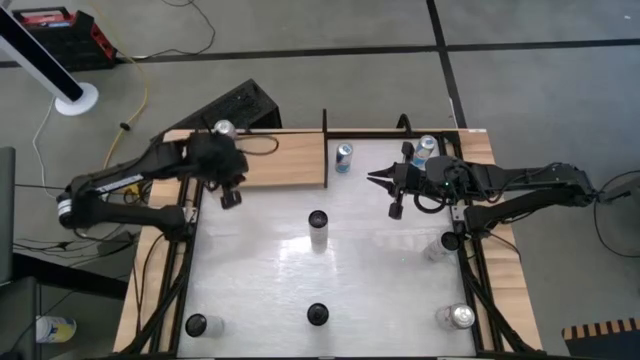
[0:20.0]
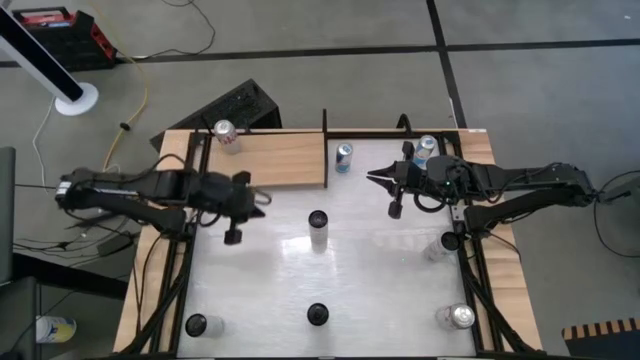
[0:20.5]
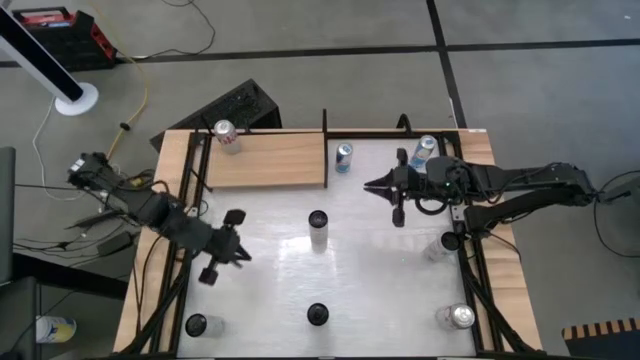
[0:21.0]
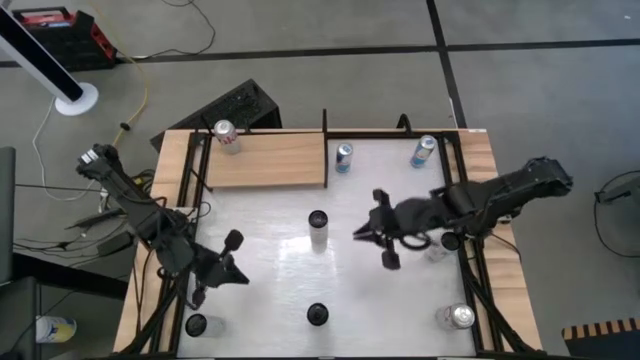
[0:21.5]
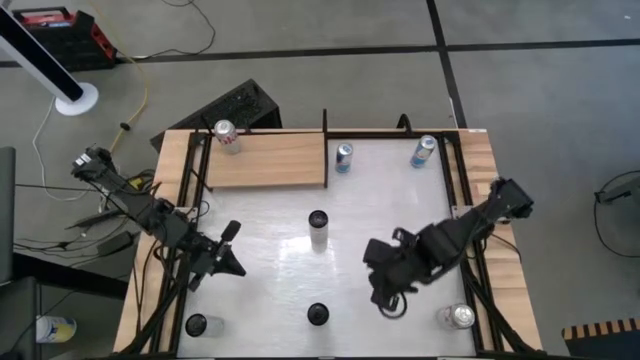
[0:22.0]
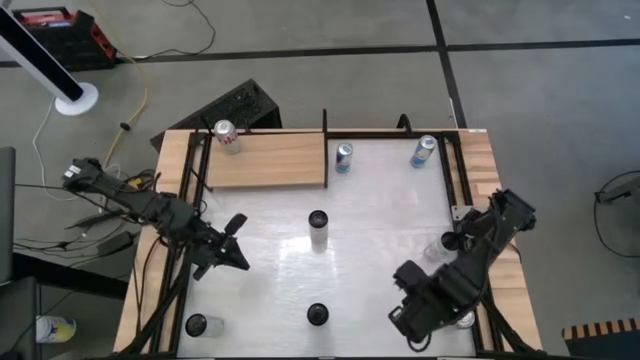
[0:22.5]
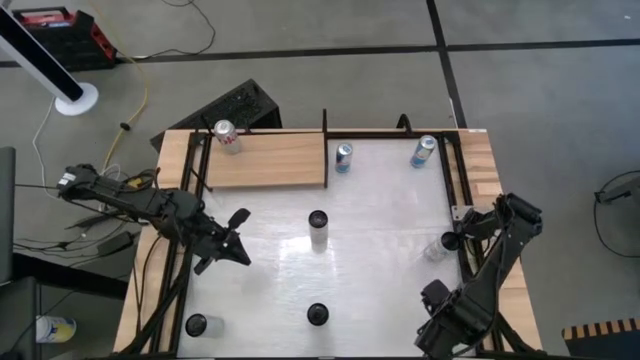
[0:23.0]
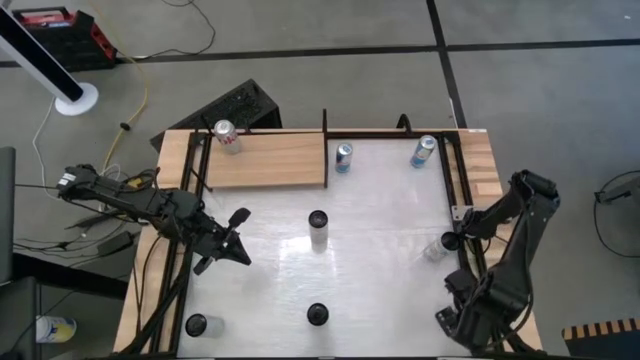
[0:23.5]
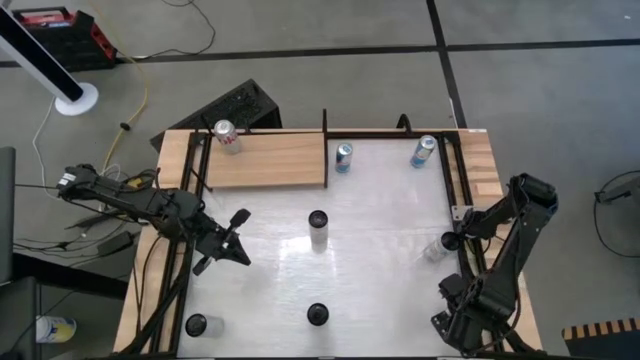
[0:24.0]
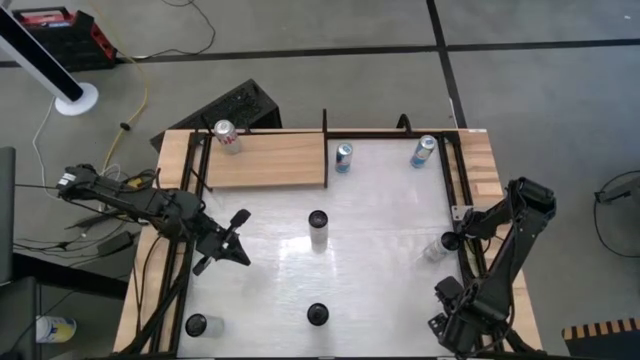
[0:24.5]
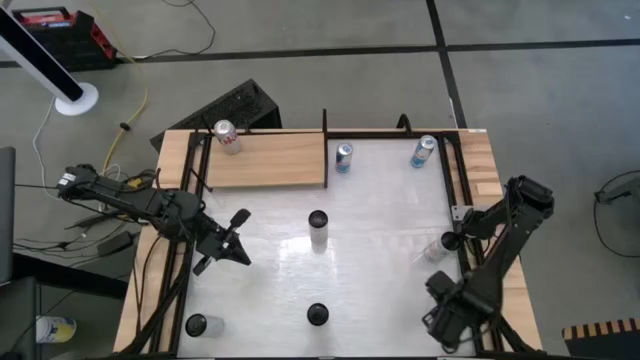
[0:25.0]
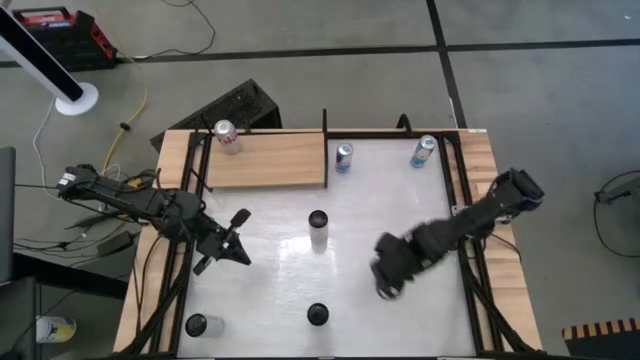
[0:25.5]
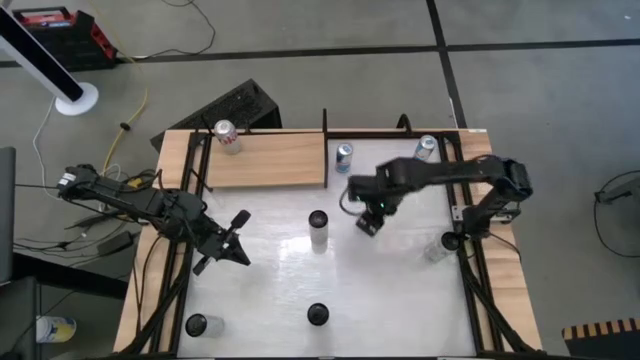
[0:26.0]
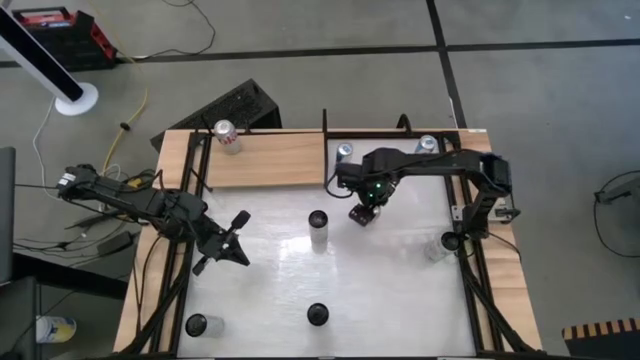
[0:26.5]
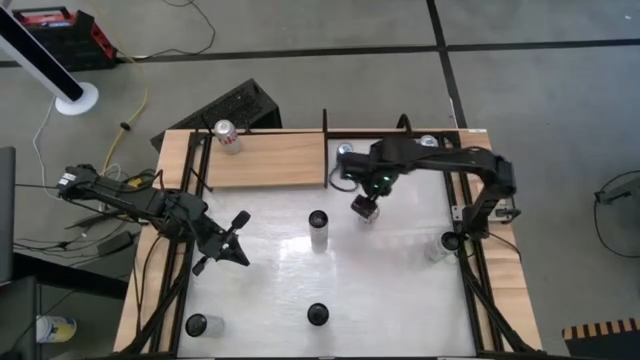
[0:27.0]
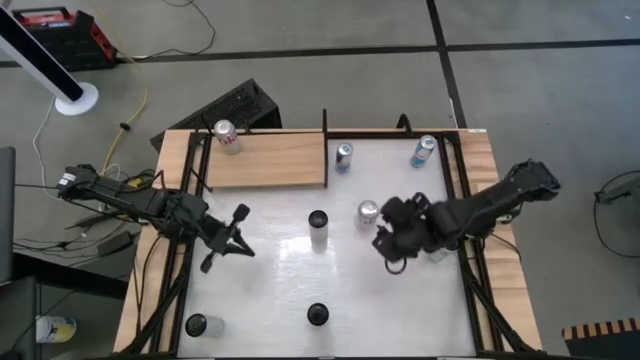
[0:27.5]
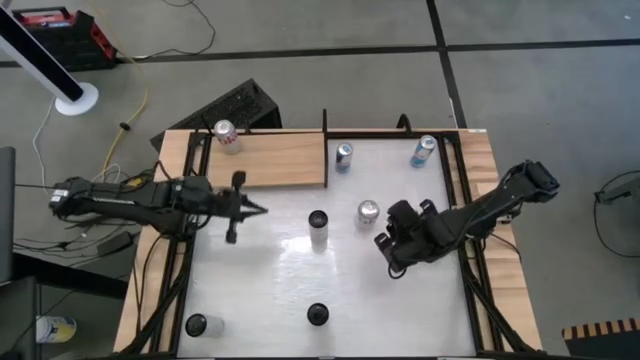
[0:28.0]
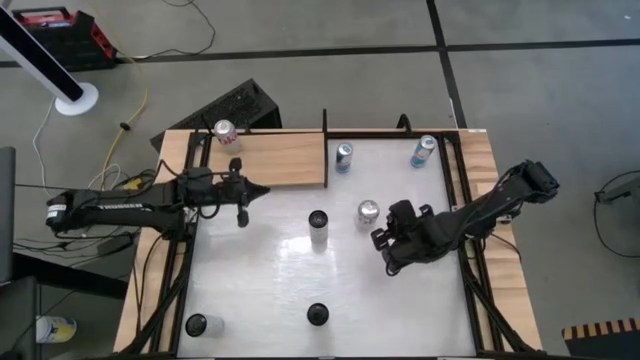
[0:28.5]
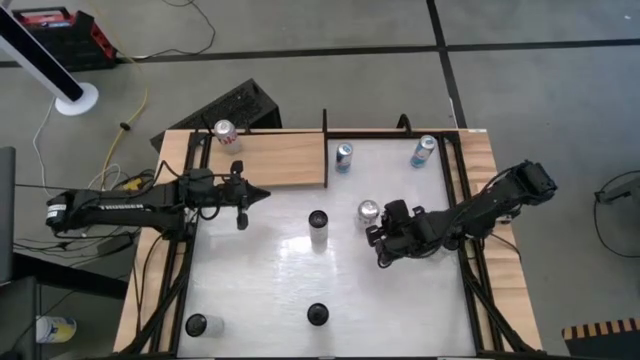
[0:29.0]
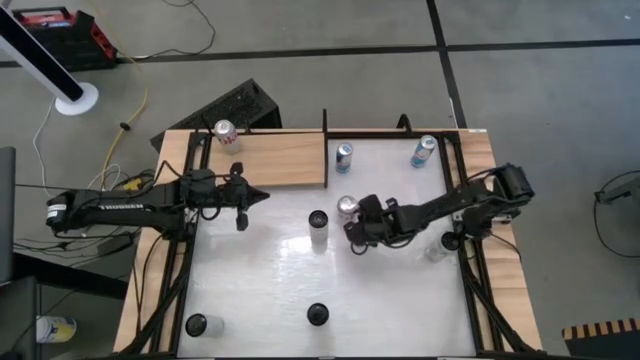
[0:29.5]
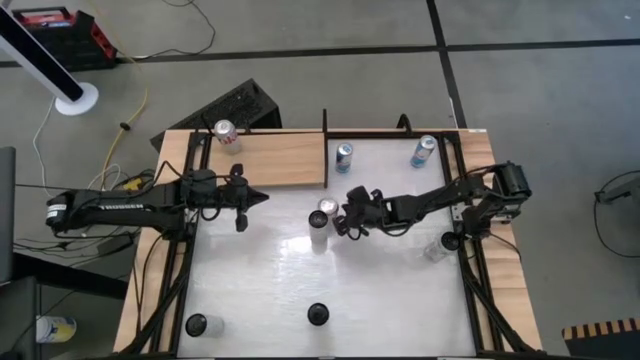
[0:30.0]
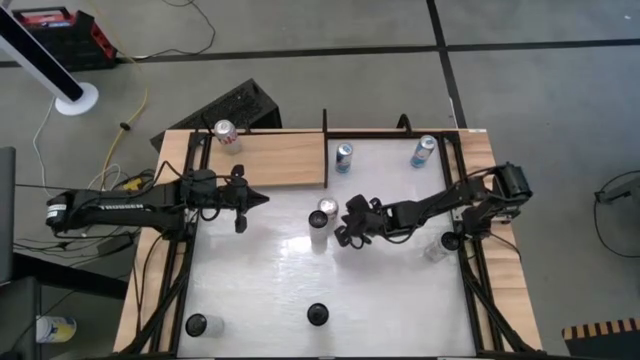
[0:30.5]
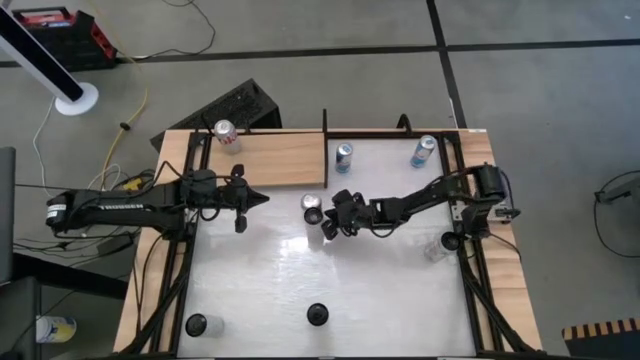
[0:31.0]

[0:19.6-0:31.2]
Task: Place canned beverage on shelf
Move the silver soda can to the middle of the table

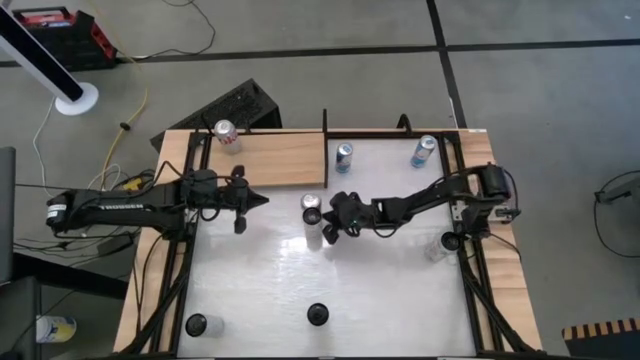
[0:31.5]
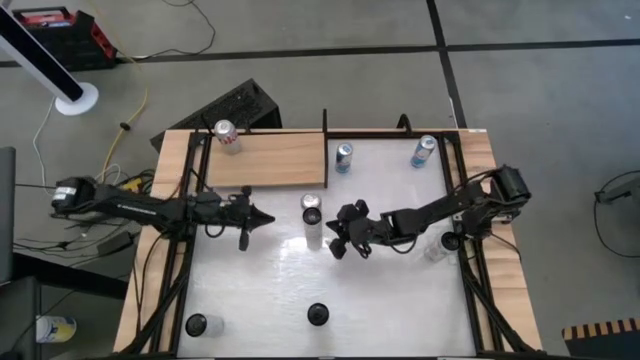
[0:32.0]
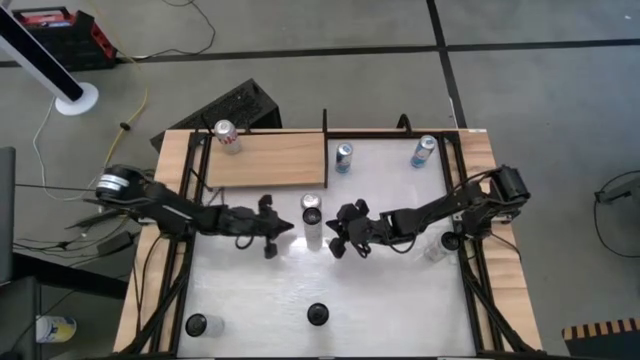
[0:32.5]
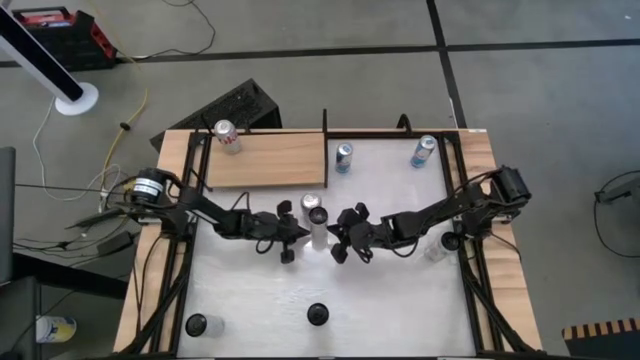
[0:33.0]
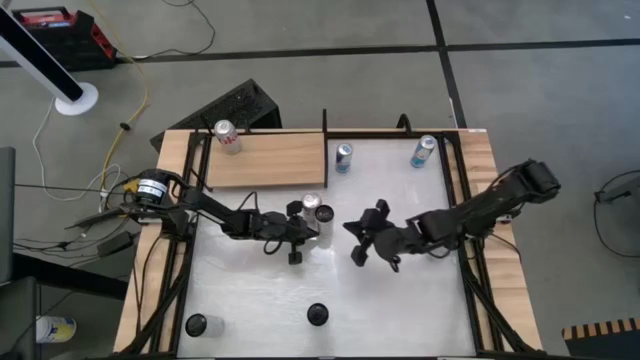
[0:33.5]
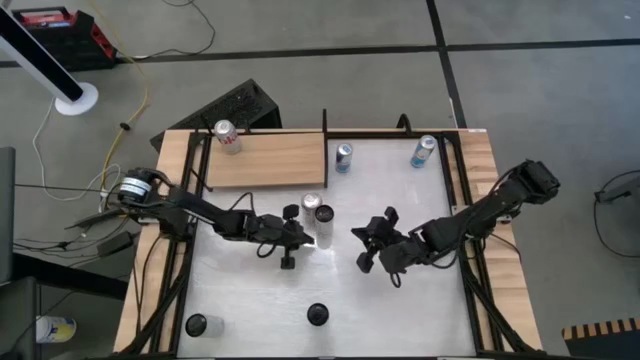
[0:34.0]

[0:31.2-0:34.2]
Move the middle white and yellow soda can to the right

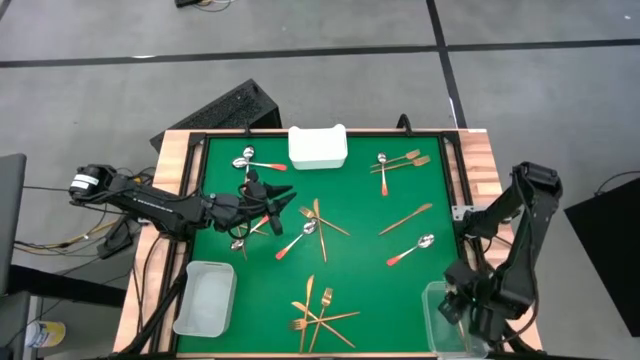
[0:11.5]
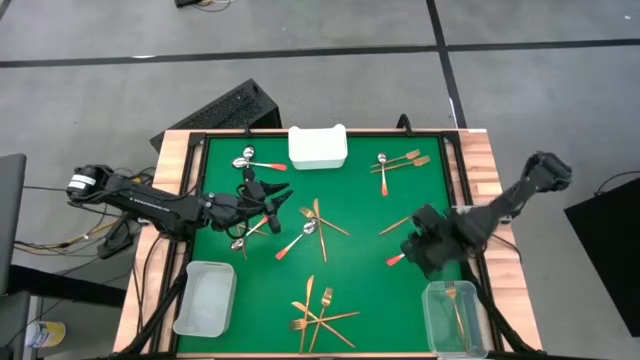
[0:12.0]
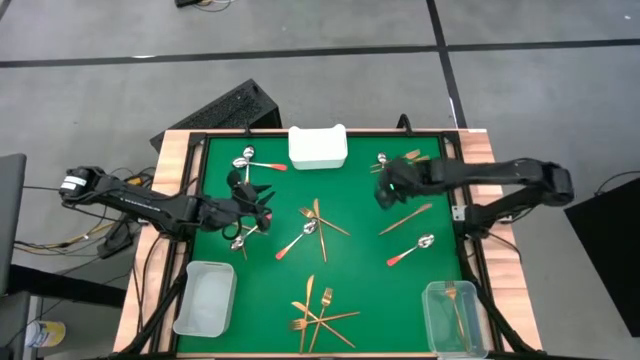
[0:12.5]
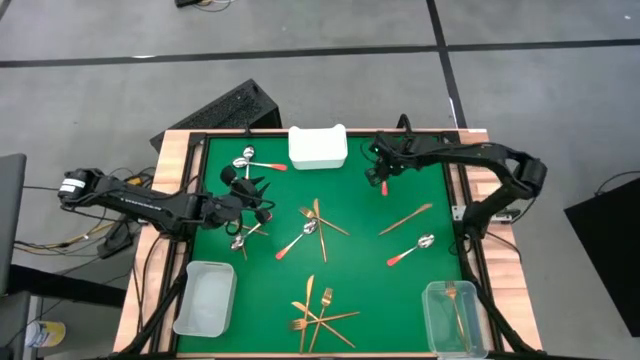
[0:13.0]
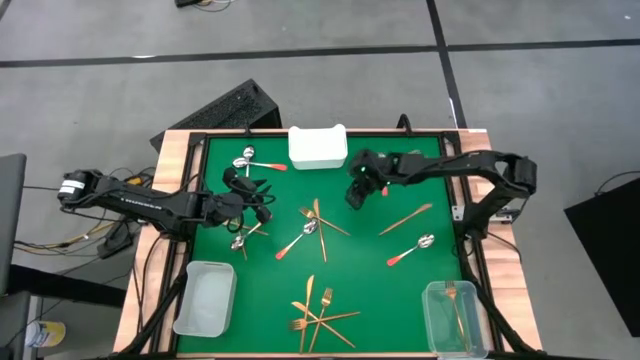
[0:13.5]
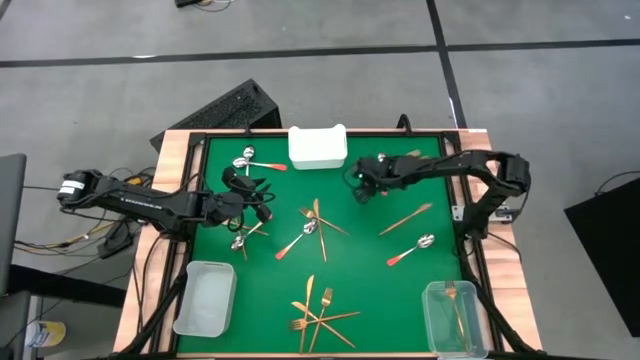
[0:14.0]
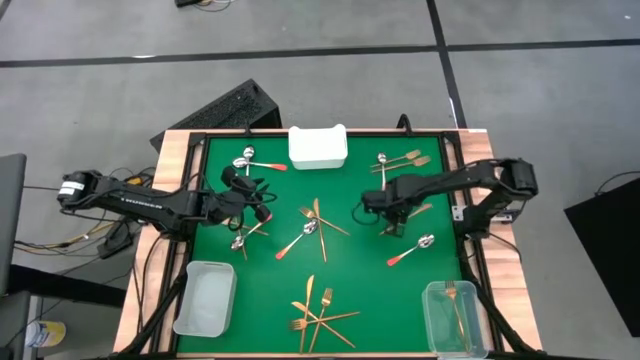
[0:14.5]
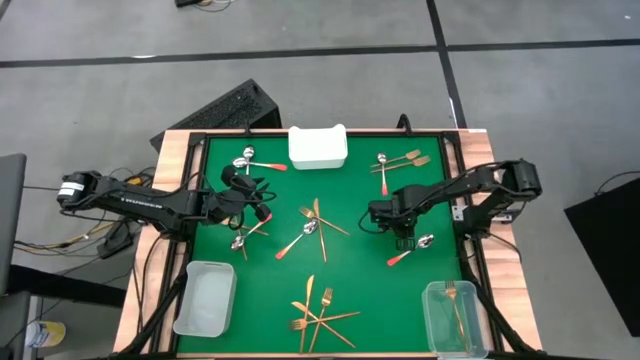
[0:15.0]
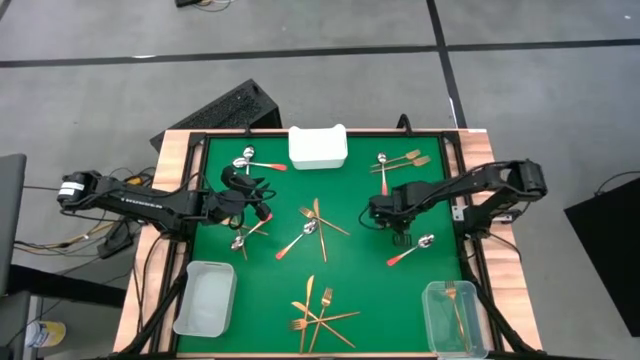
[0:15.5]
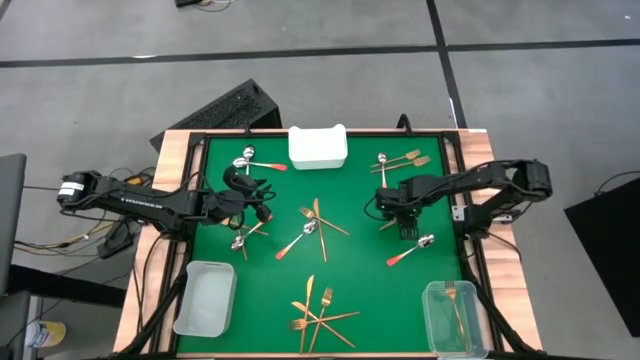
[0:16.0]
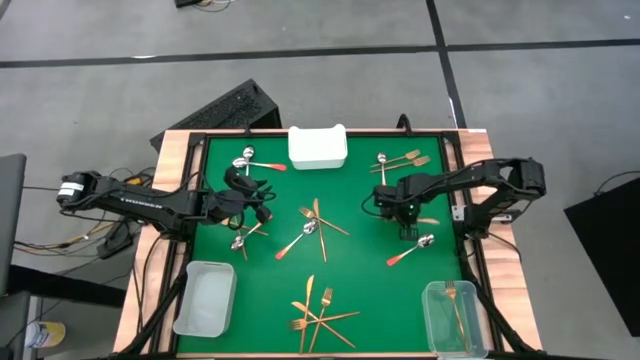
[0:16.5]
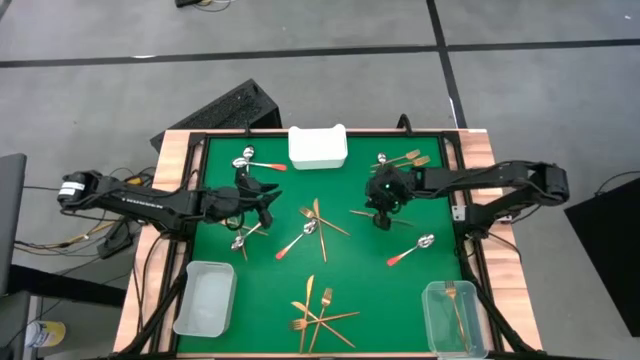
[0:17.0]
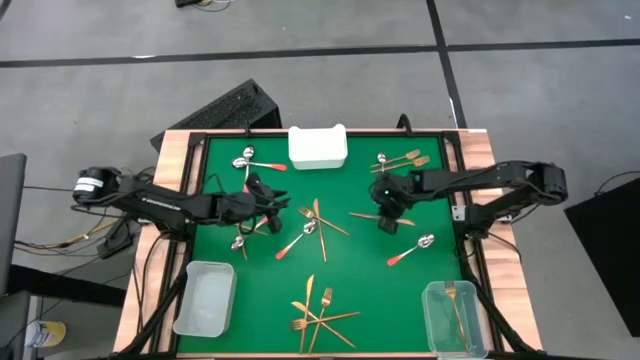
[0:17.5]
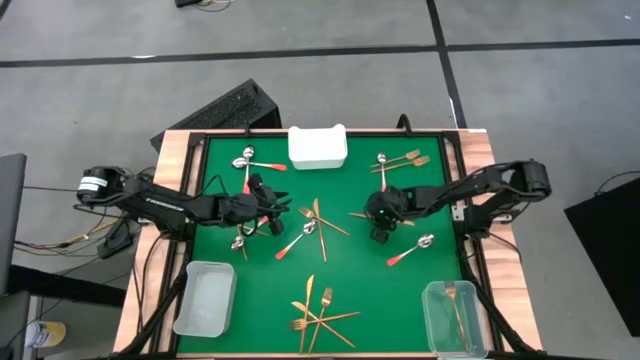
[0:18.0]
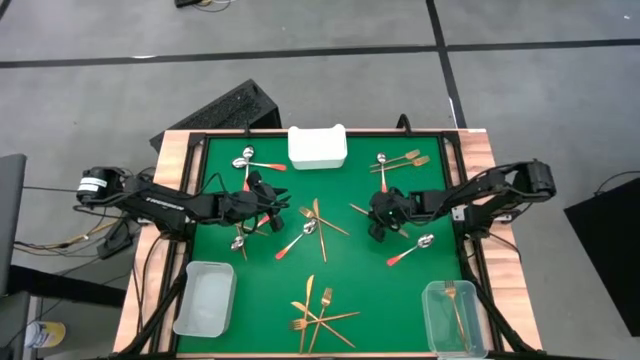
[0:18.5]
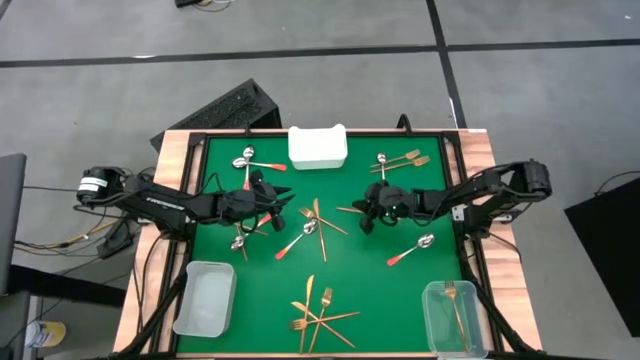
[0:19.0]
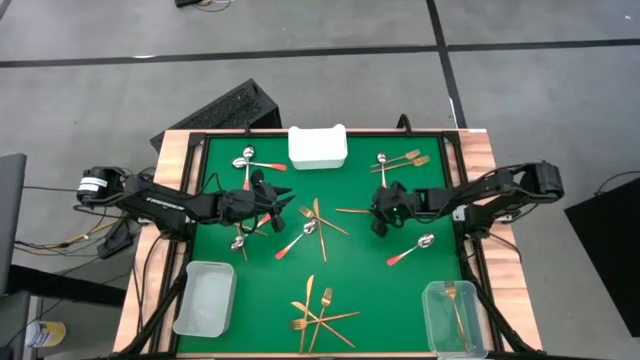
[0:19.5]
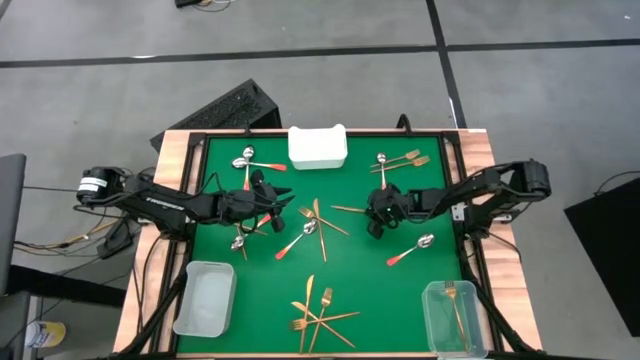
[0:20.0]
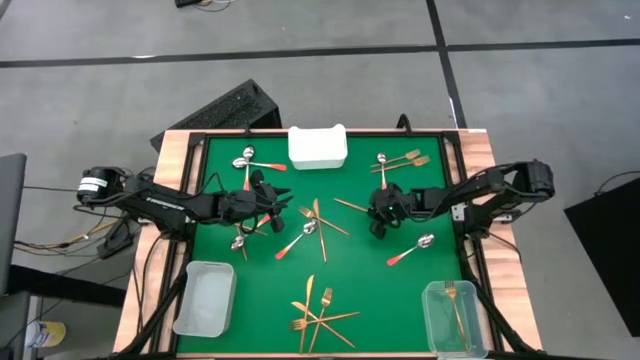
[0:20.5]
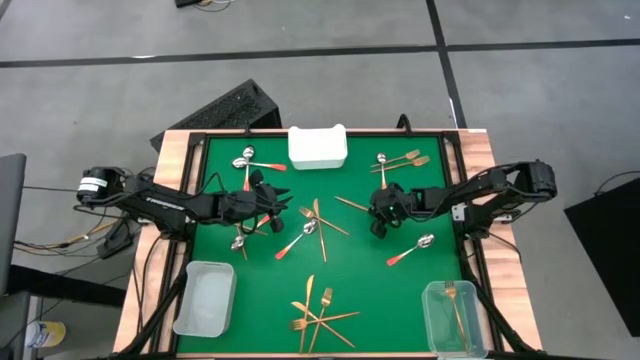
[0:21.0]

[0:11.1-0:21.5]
Task: Sort silverware by color (type)
Put the gold table knife into the white bin
